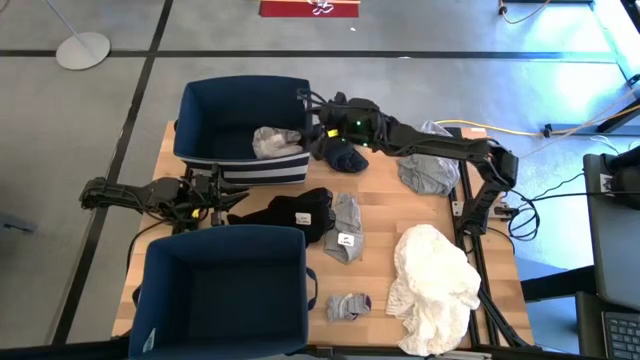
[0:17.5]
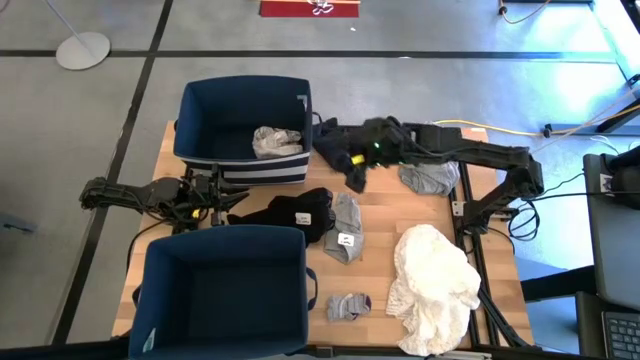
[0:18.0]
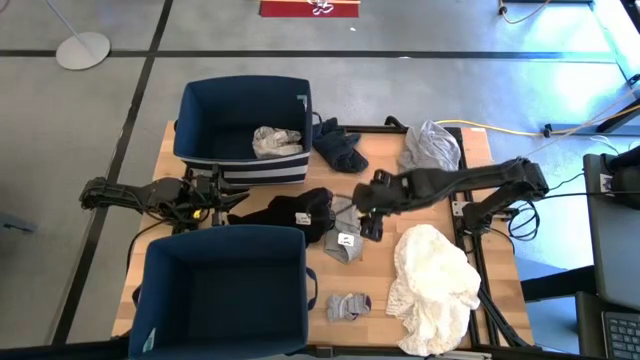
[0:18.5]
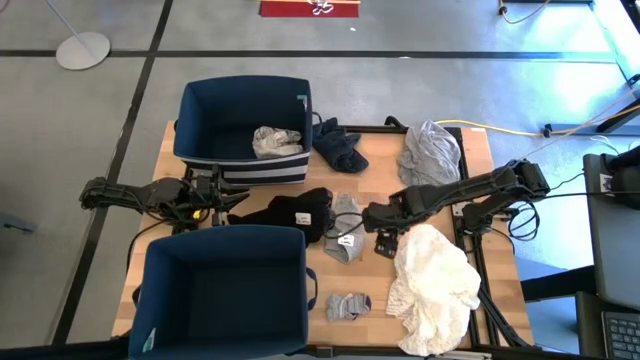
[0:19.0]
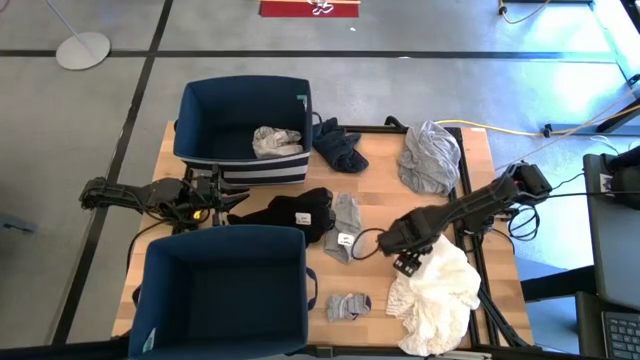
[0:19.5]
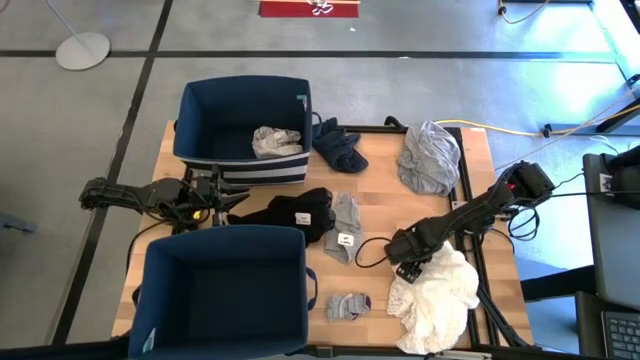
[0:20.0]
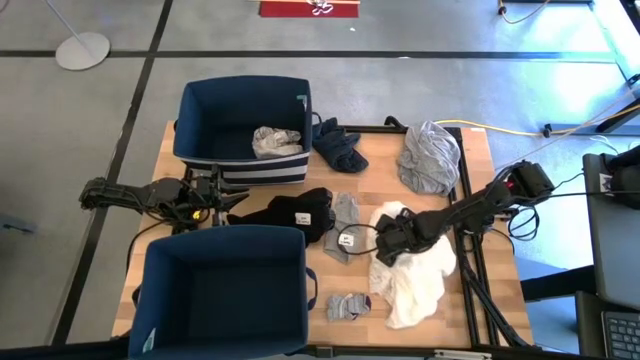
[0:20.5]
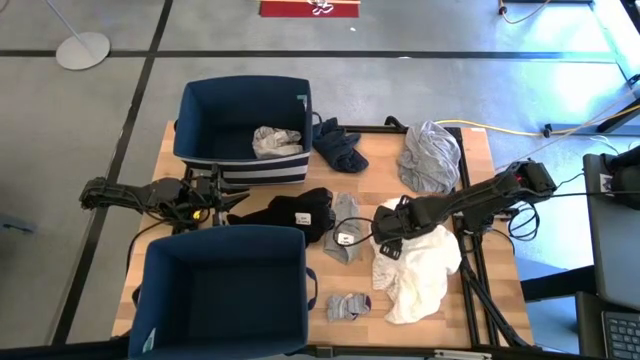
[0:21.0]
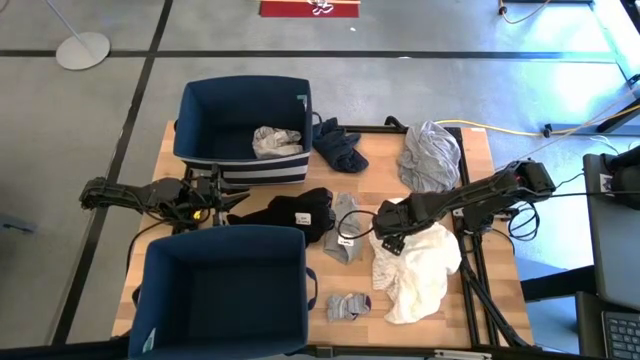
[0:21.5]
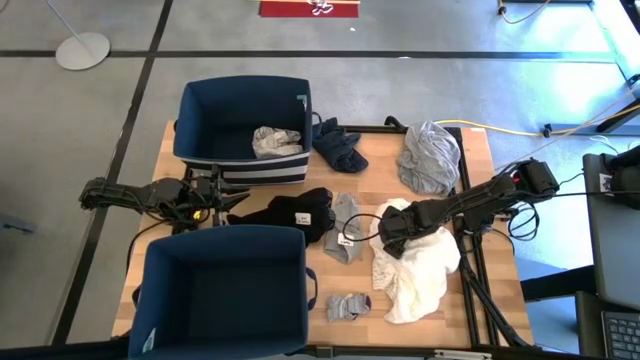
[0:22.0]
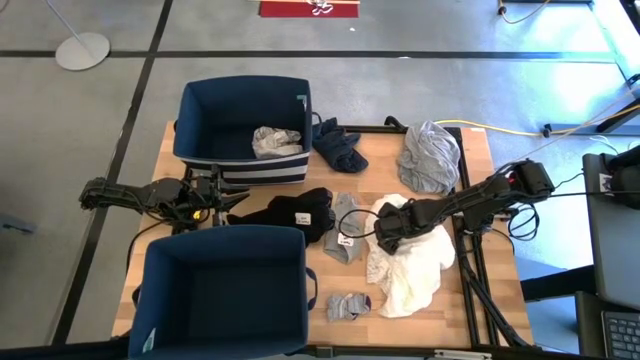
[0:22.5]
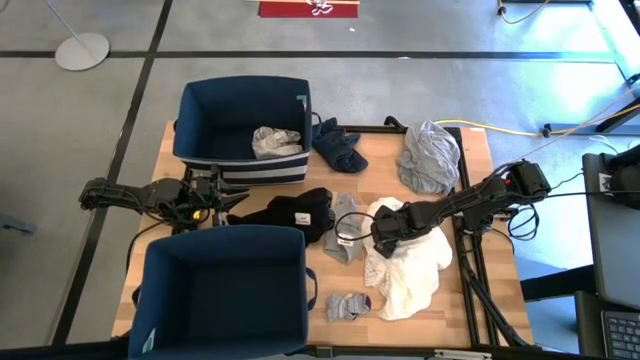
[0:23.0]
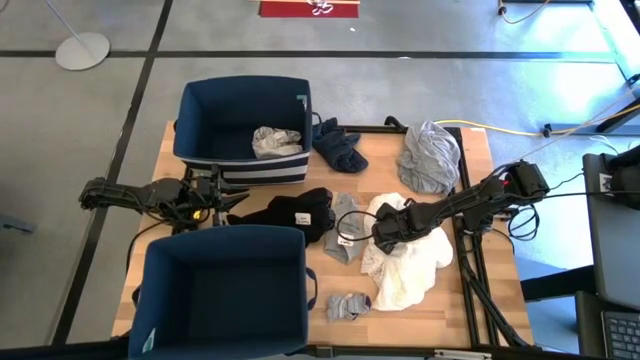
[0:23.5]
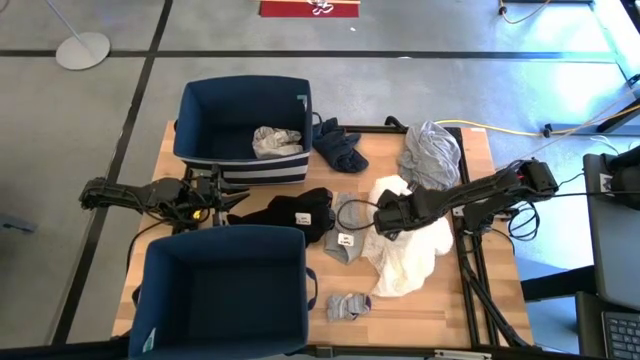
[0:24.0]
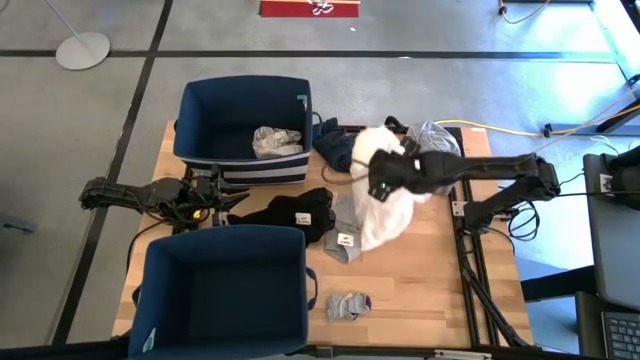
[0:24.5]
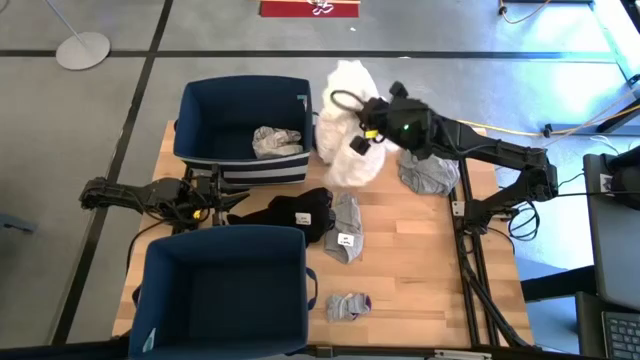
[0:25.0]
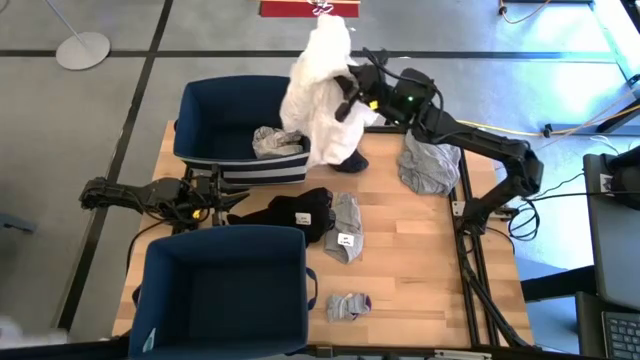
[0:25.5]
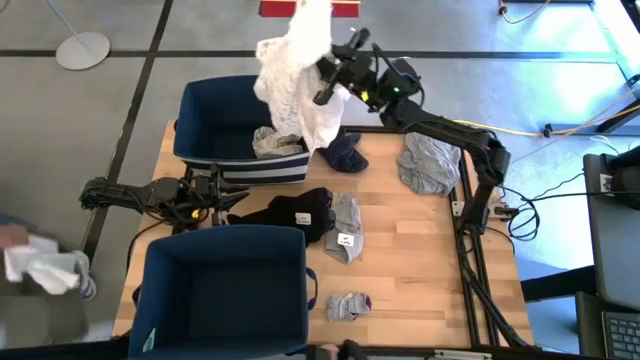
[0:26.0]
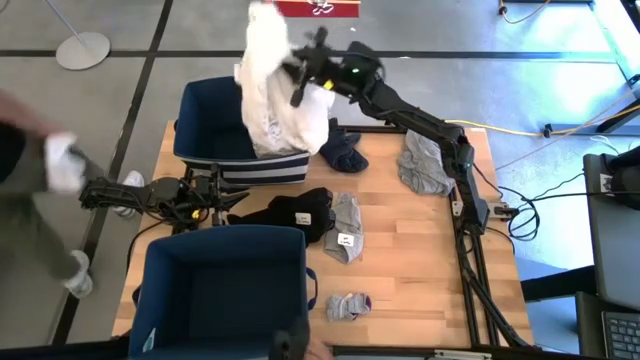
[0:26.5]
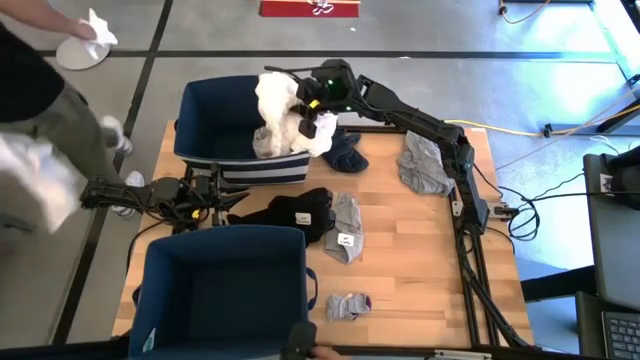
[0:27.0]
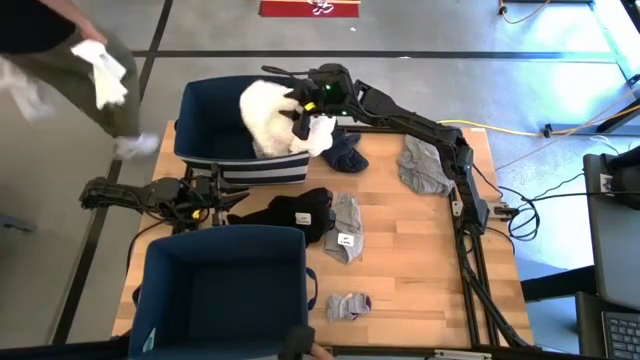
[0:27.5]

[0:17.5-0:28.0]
Task: Sort clothes
Put the white shirt into the top blue laundry organizer

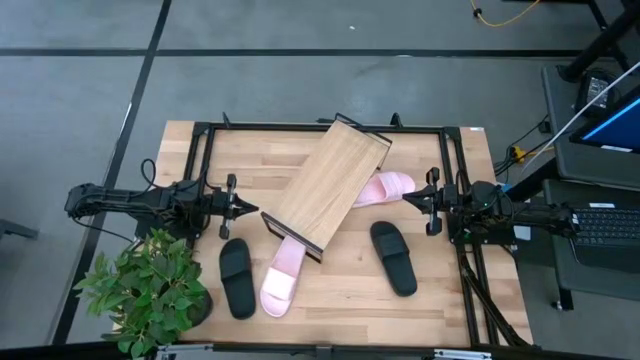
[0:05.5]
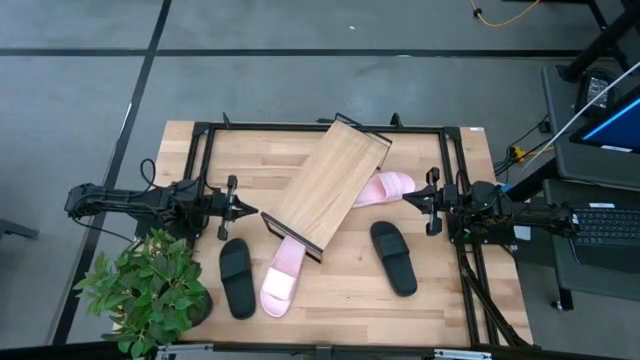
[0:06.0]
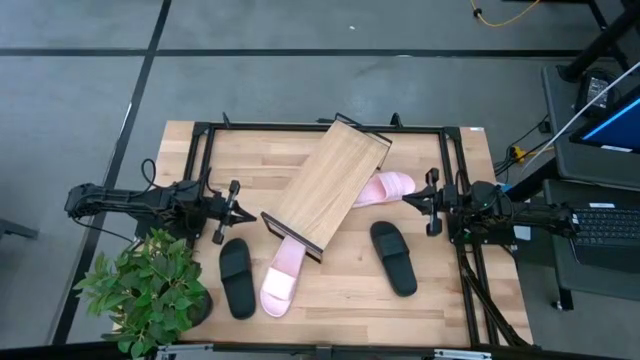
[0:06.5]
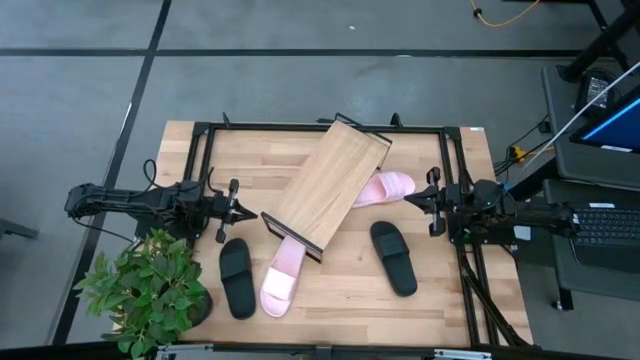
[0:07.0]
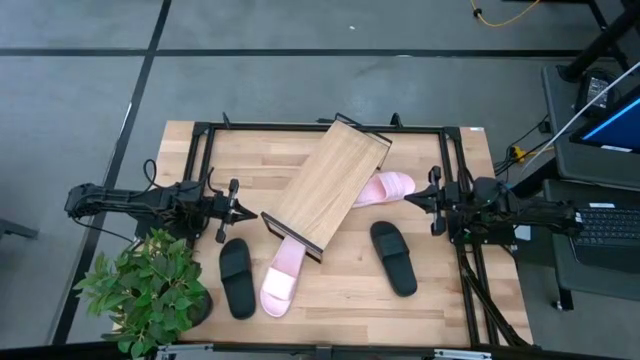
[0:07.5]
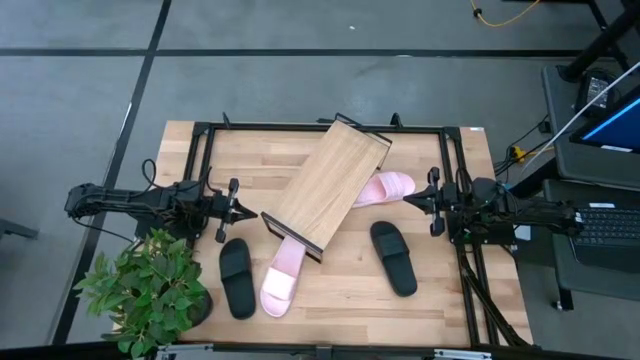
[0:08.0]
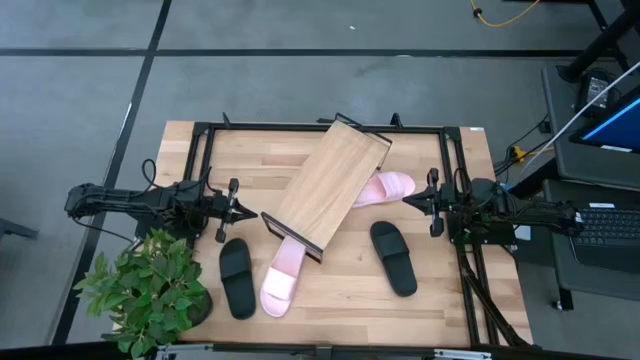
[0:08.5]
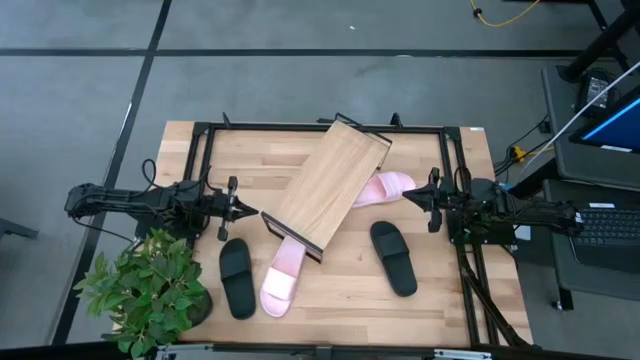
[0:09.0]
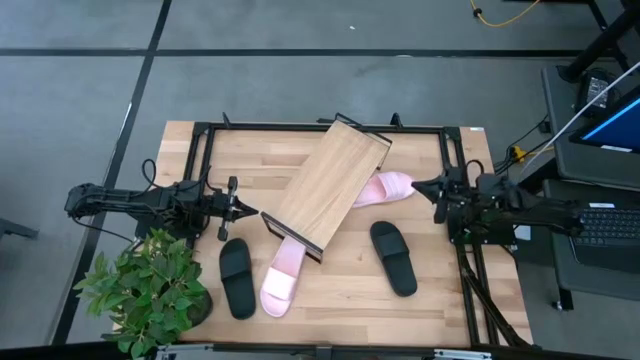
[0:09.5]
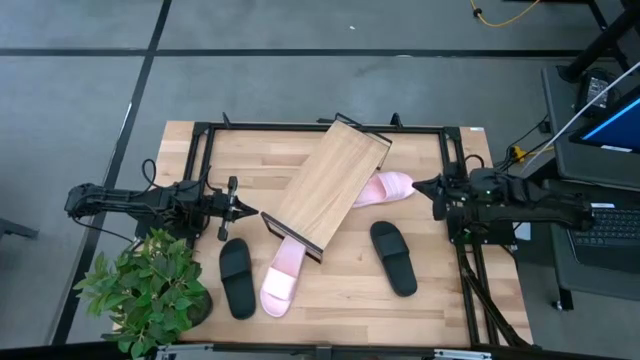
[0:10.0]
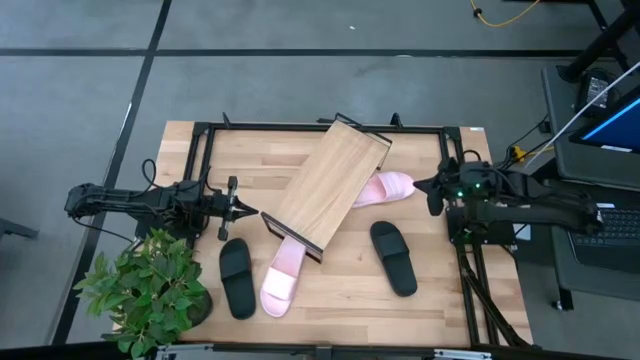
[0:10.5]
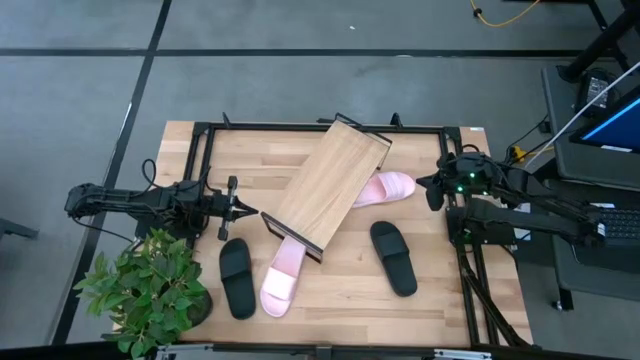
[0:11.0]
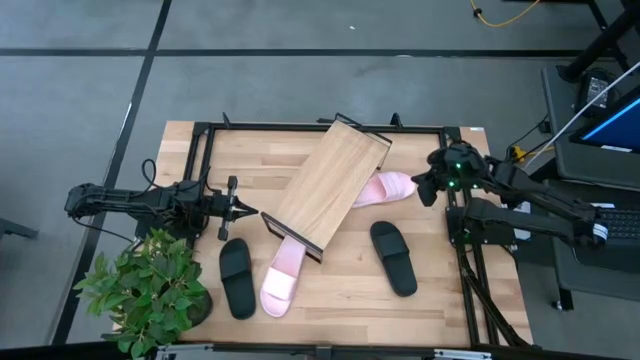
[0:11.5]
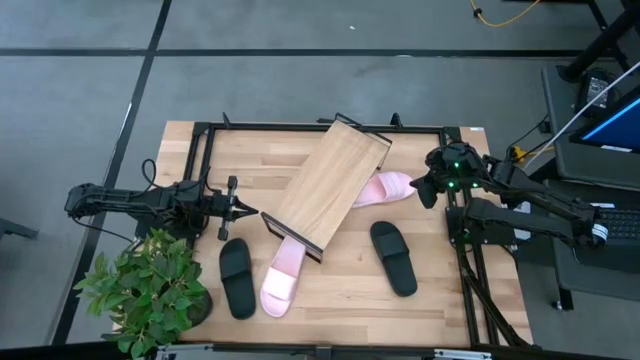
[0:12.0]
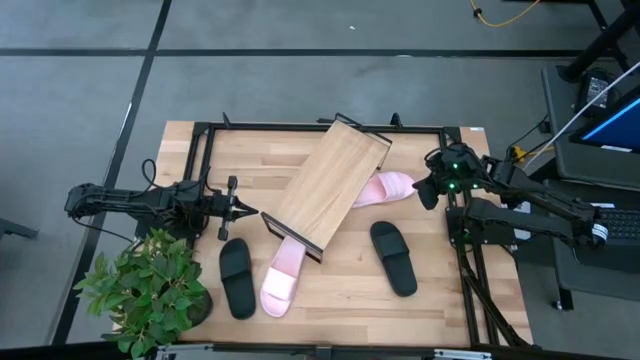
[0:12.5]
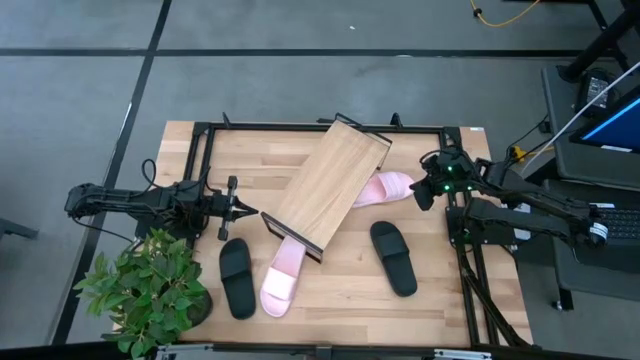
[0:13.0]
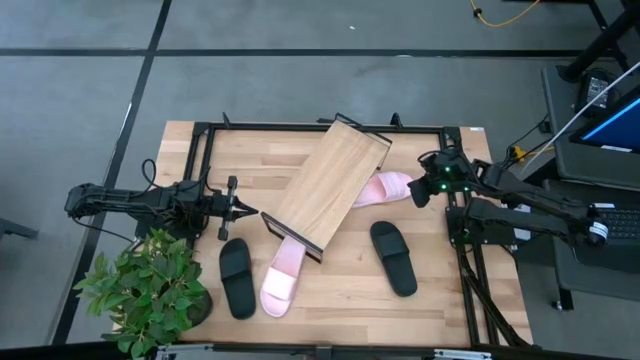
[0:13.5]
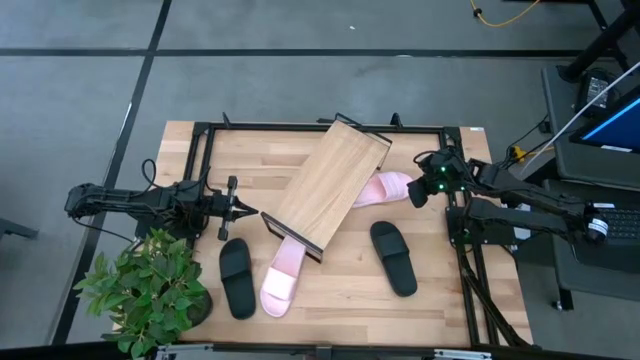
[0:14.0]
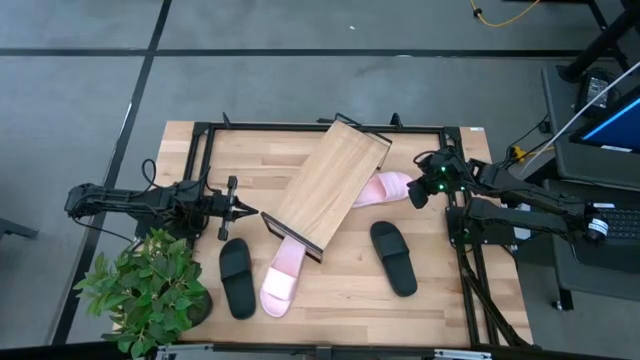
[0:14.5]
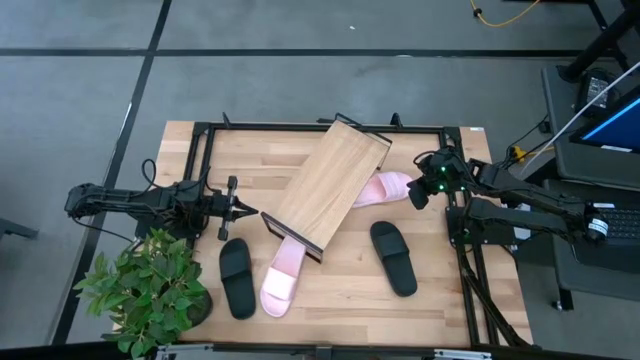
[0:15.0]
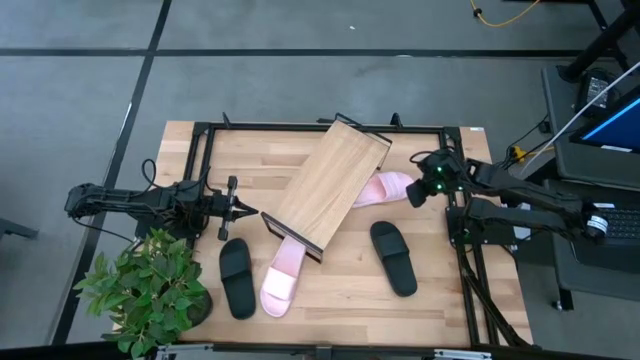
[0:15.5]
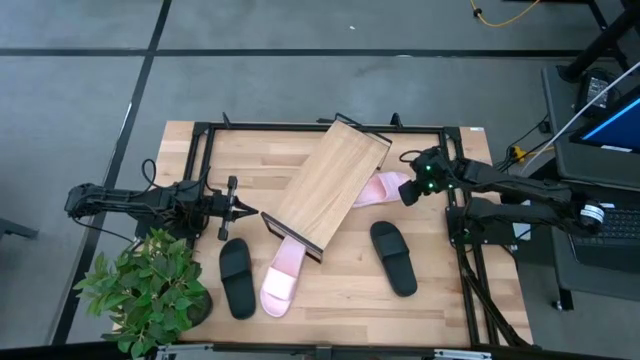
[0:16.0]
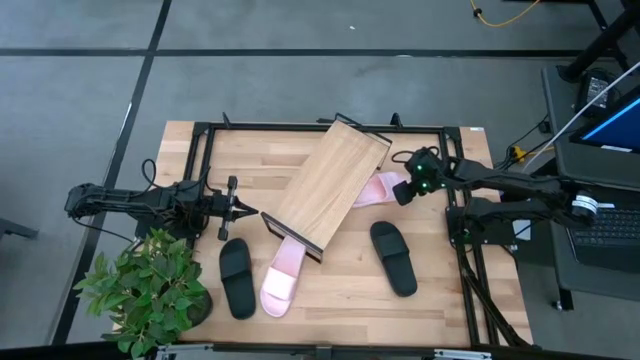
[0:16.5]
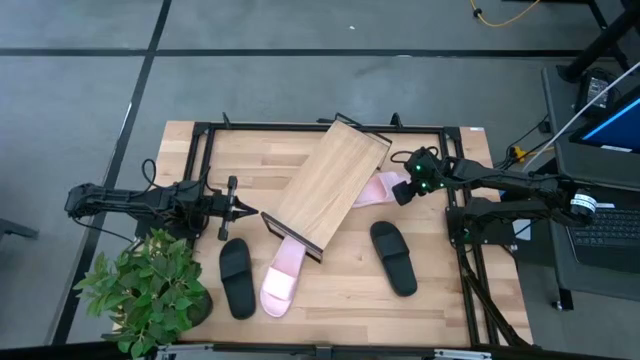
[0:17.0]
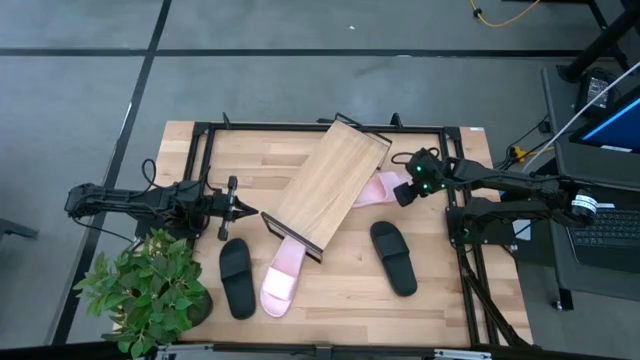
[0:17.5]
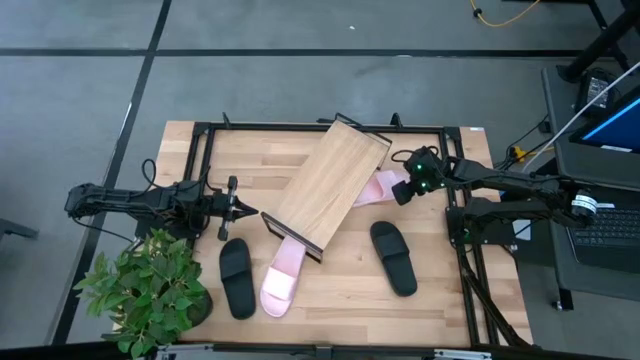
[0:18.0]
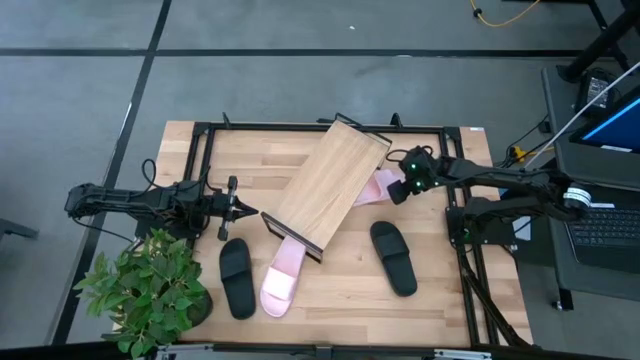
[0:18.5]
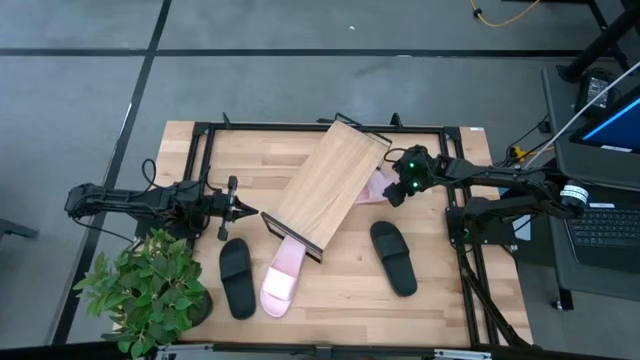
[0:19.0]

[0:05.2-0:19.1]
Task: Pick and place slides into the shelf
Put the right pink slide on the shelf
